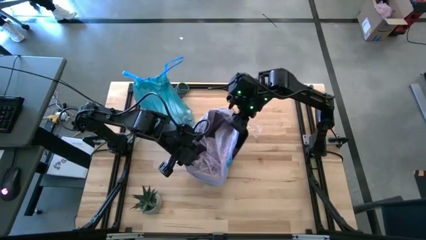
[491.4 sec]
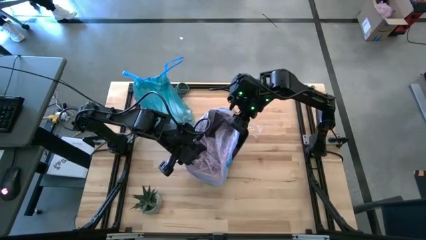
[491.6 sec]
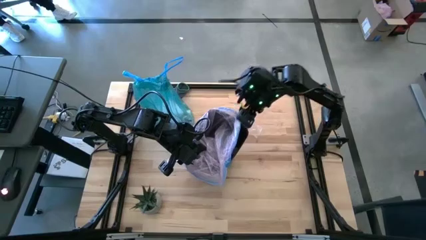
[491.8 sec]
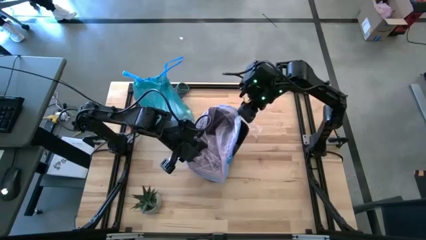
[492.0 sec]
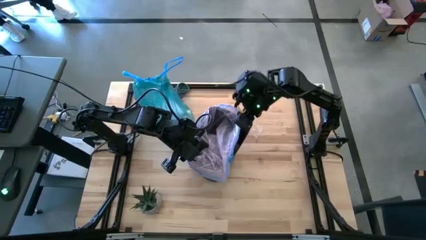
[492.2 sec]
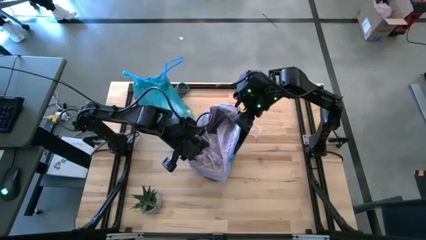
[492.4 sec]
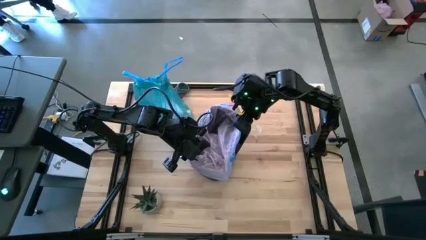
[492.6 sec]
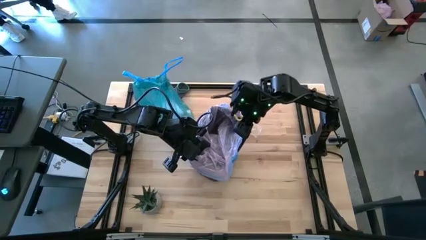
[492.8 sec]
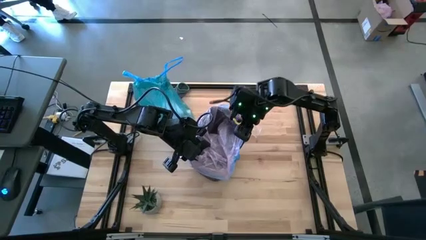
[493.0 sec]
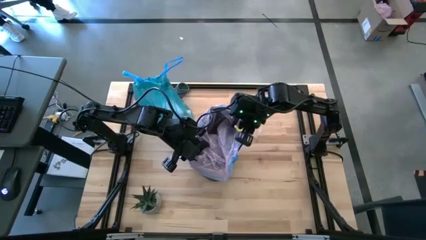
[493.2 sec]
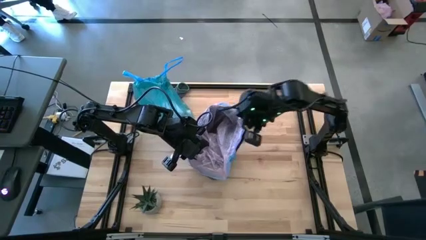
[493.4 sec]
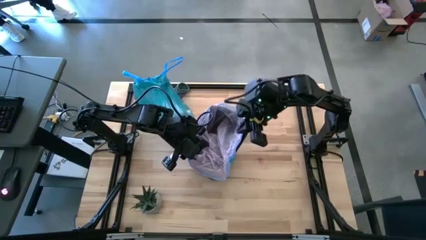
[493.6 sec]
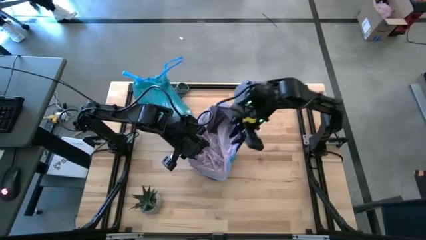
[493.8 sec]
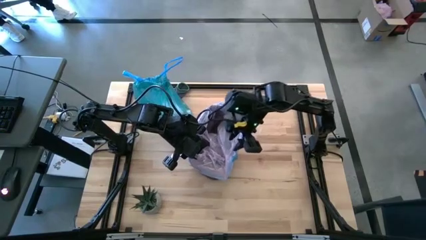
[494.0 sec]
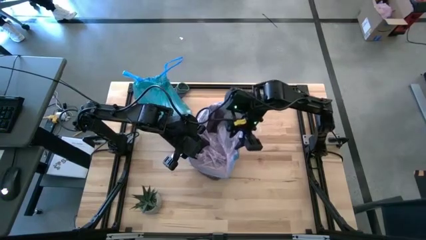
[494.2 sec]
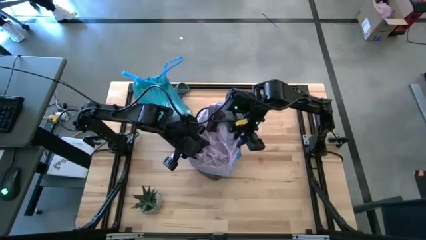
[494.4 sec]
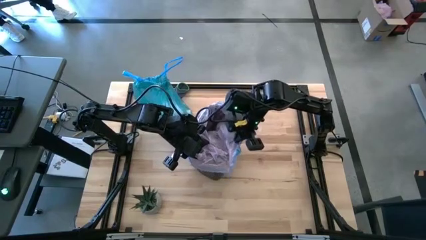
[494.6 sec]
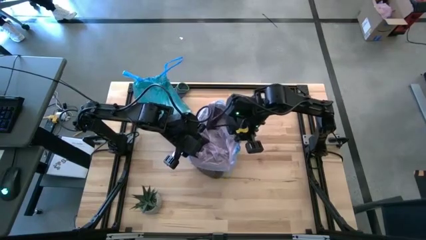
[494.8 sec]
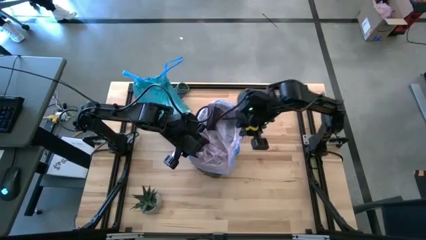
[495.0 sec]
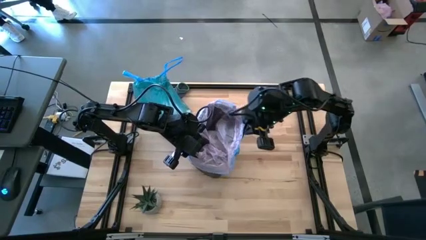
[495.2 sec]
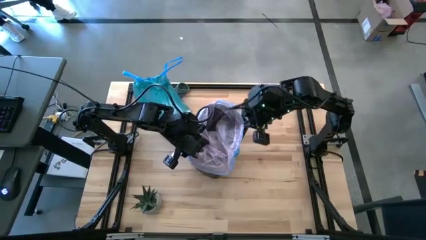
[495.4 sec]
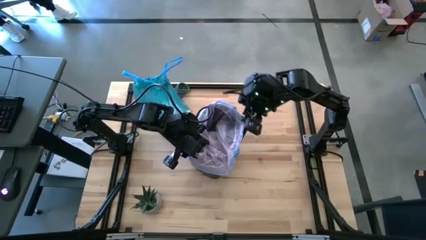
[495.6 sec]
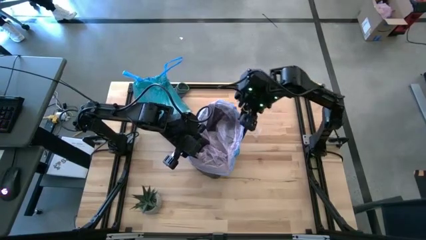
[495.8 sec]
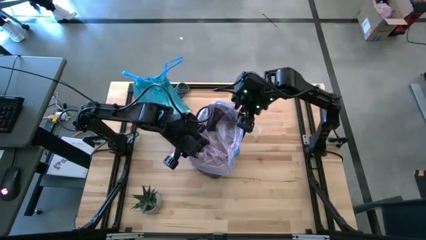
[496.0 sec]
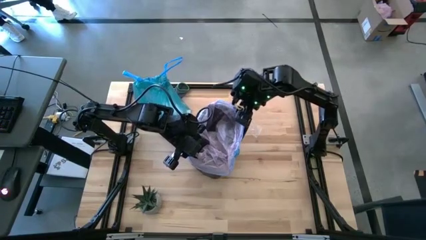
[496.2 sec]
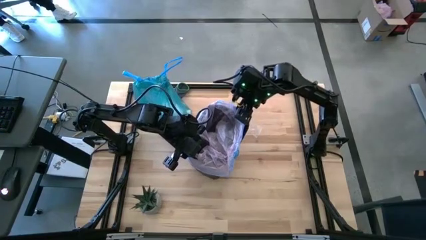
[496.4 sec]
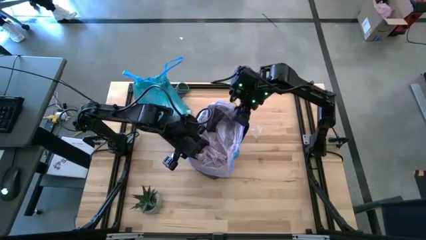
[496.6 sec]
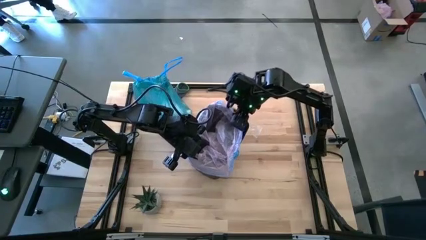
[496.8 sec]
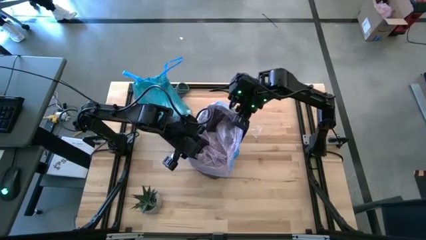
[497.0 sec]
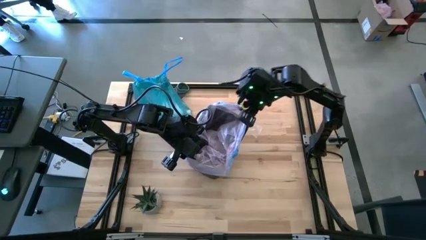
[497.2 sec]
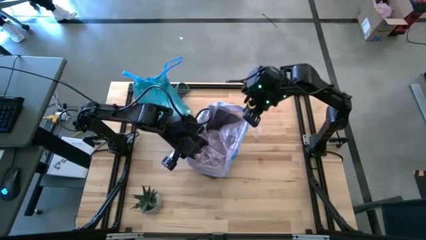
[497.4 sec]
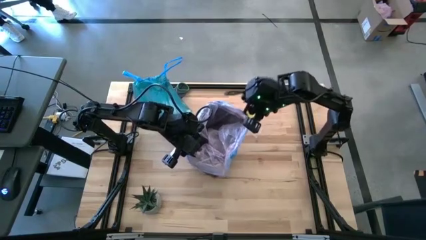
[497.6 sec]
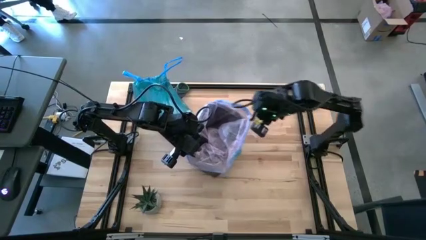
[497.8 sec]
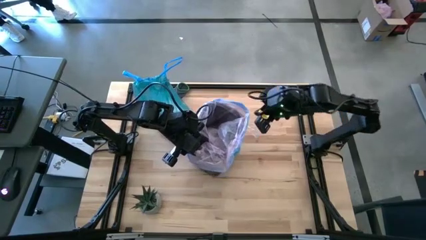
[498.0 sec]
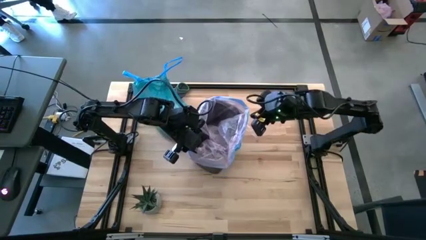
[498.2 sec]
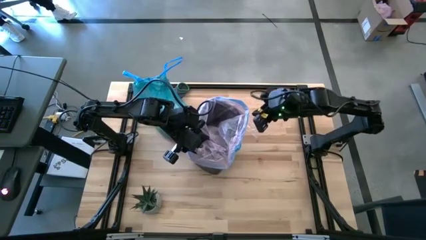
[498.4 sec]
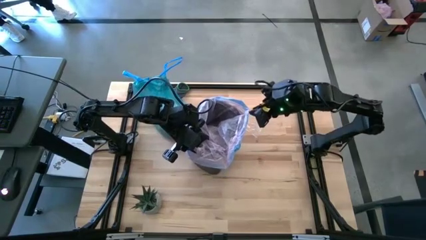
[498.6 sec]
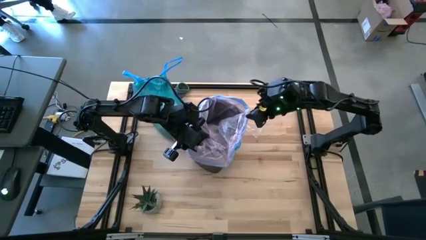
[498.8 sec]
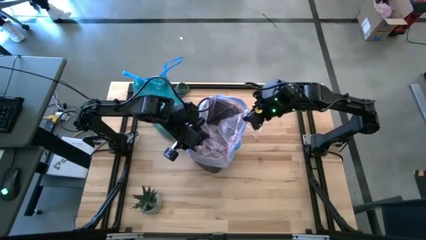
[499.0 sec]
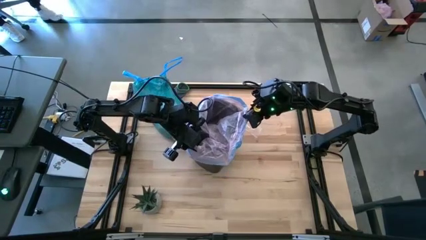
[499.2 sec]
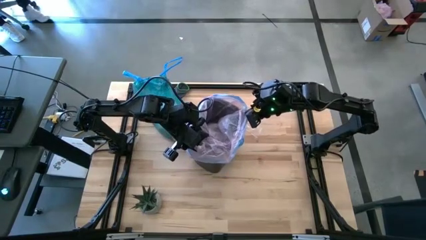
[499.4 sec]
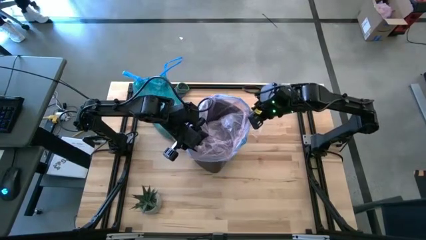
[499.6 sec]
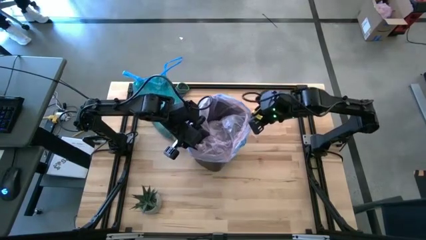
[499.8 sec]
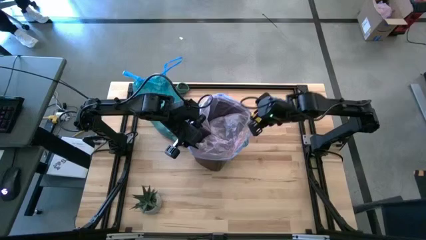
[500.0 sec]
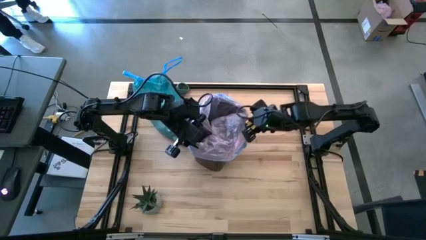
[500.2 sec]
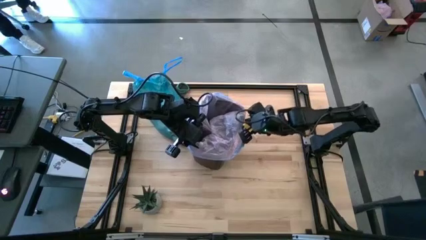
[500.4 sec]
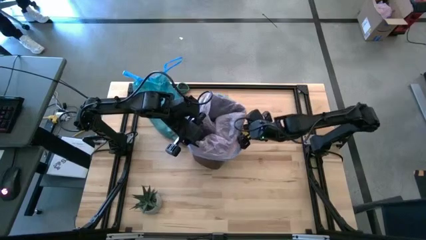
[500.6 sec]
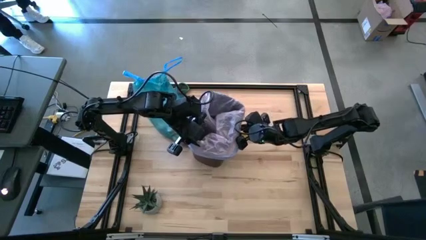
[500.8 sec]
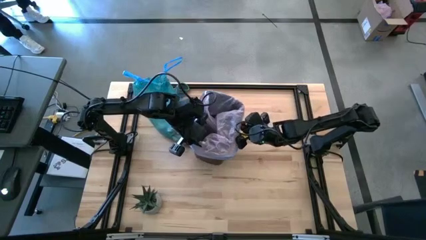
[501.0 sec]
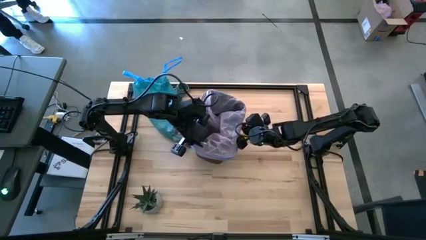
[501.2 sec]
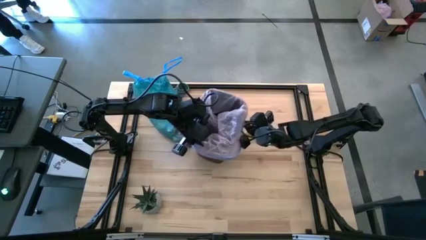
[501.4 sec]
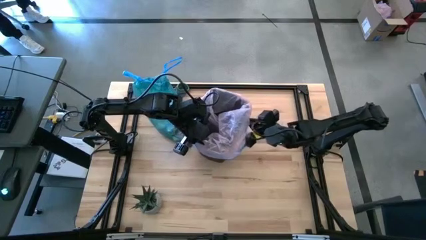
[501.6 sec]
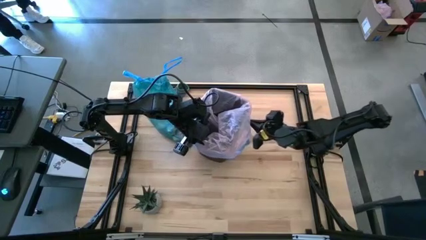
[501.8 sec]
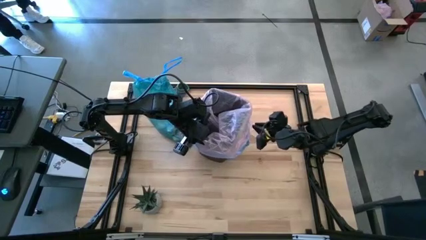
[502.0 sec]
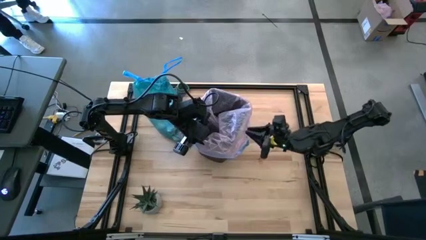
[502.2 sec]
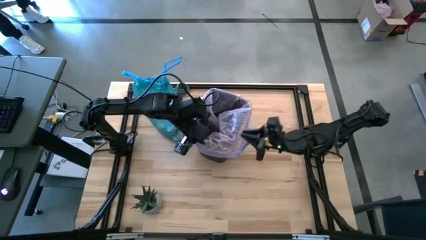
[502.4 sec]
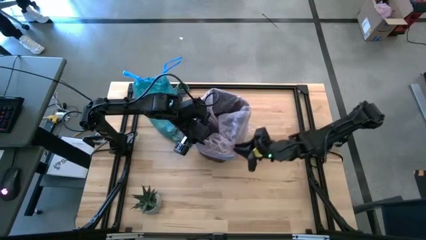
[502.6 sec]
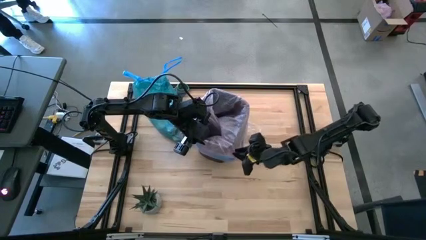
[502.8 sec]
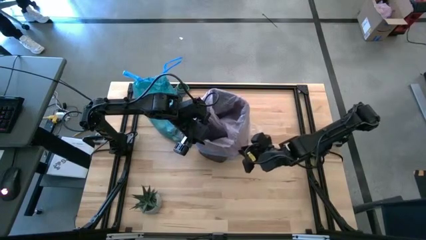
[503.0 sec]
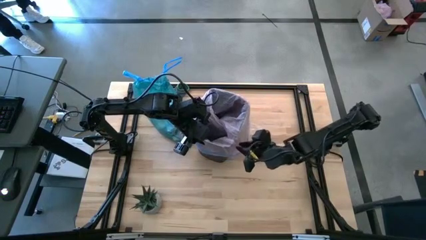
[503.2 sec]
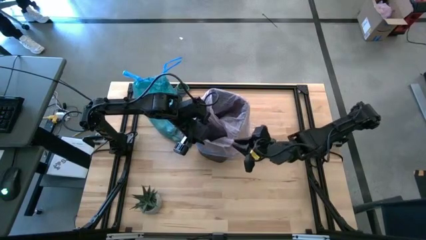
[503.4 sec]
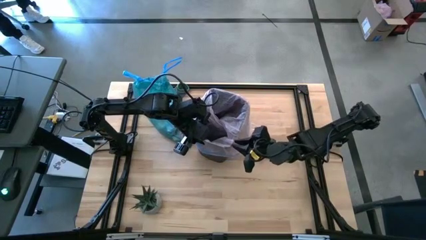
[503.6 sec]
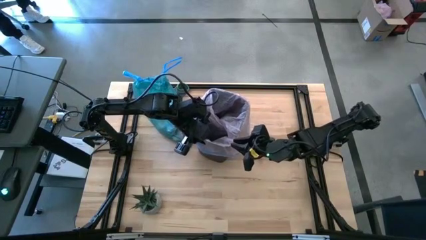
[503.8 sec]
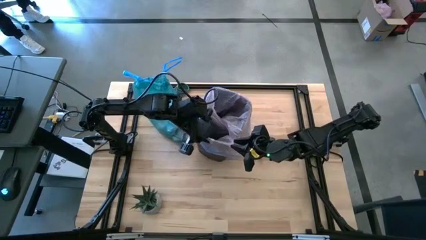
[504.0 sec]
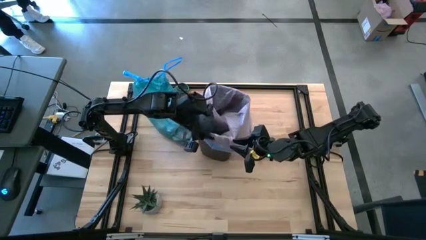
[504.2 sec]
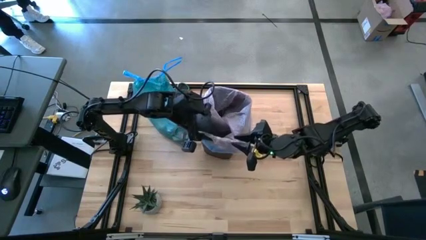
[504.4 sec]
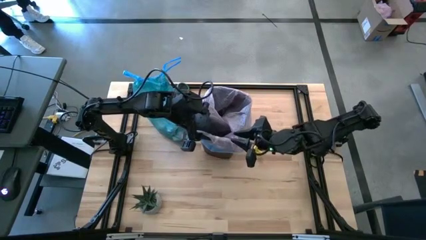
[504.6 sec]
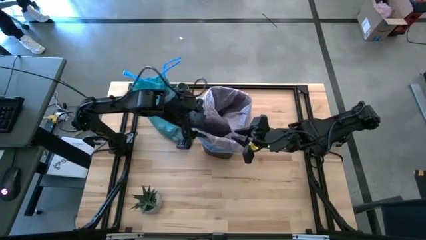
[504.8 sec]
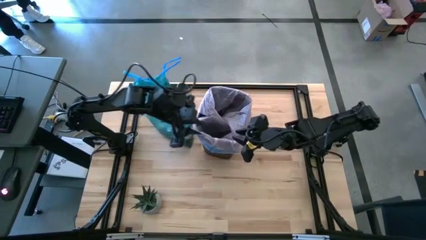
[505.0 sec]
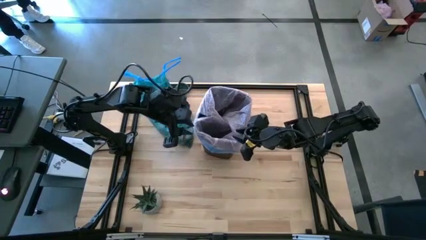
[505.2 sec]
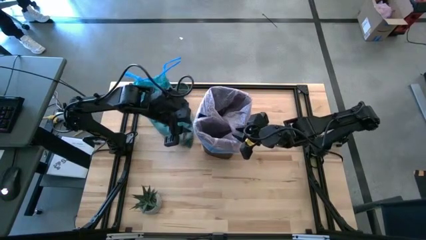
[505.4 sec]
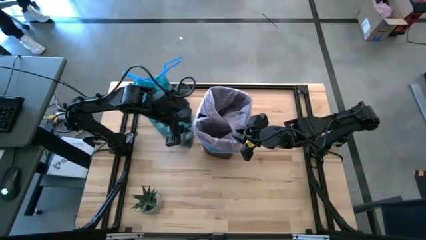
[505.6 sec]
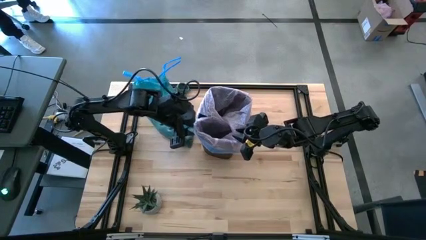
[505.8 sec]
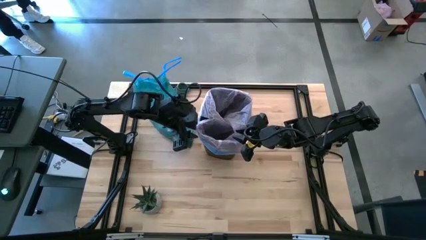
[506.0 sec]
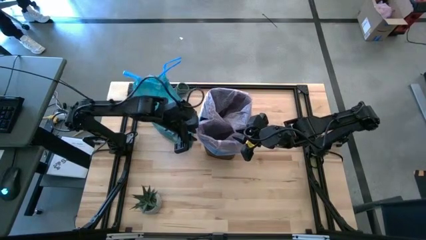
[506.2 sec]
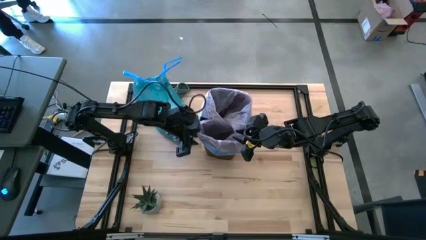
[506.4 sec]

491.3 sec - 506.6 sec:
Task: place trash/remove bag and relplace
Insert the pink trash bag into the trash bin
